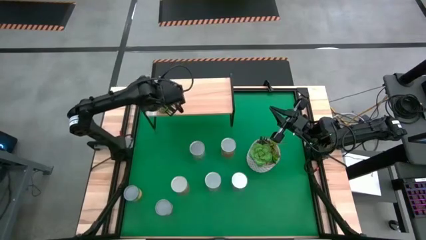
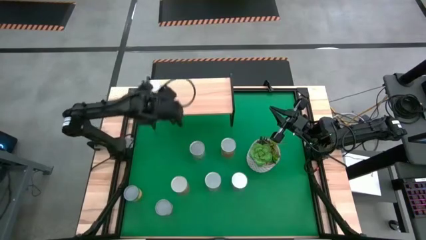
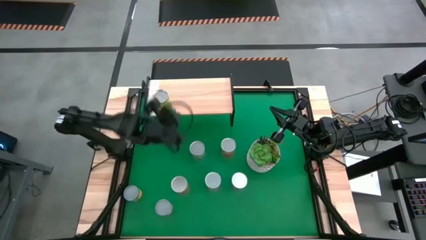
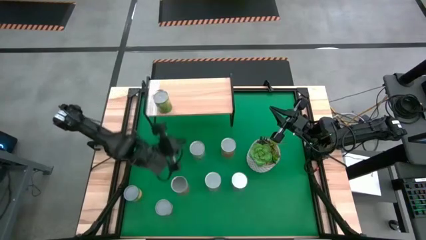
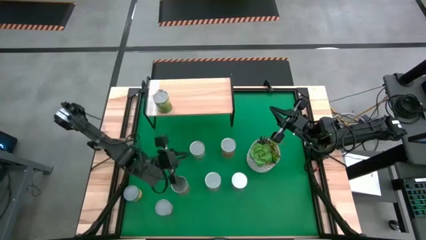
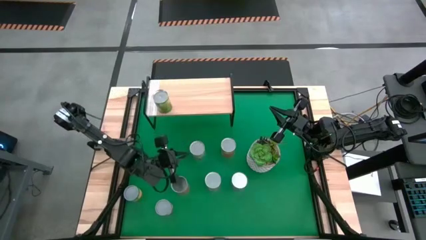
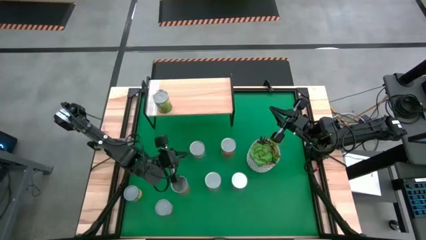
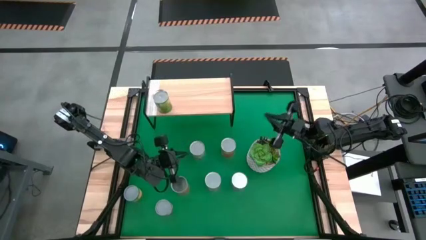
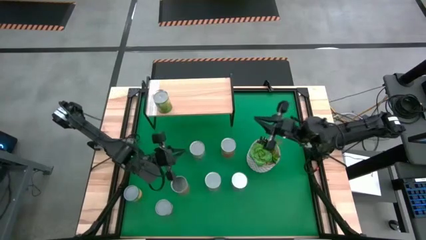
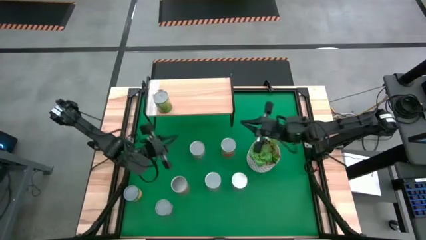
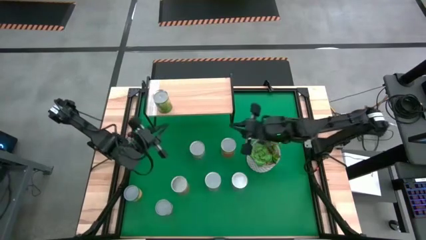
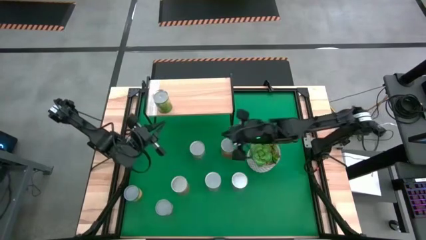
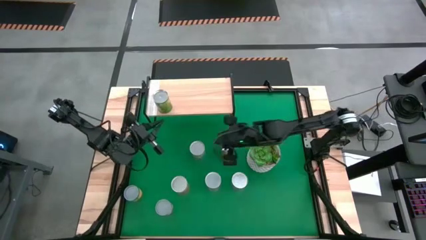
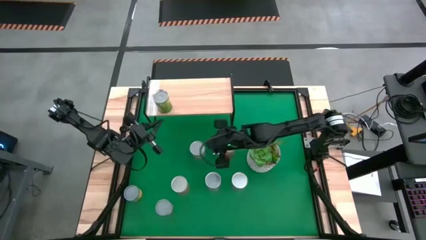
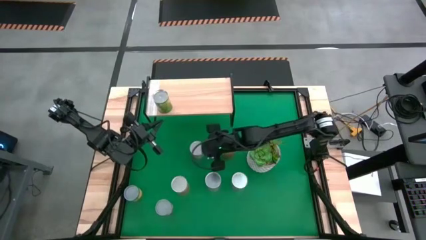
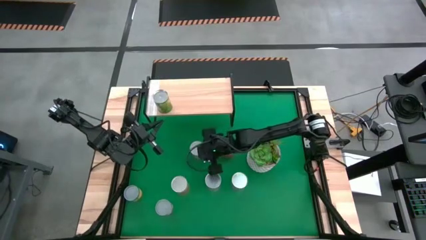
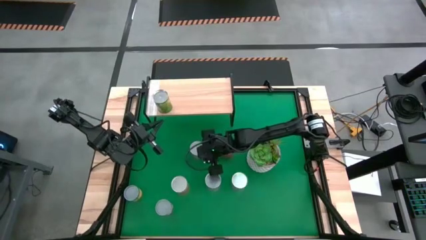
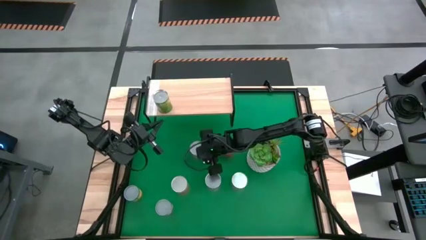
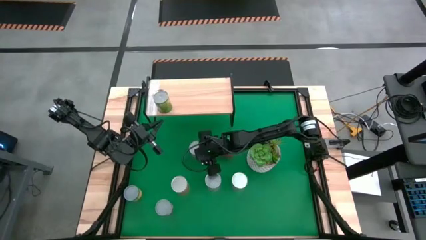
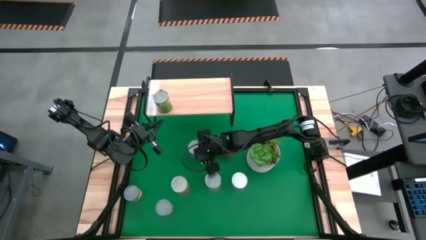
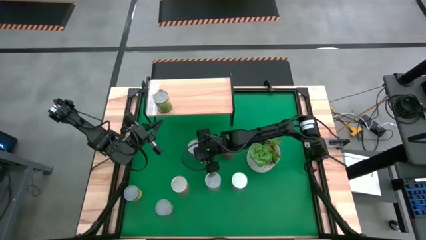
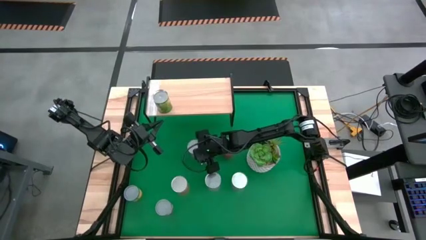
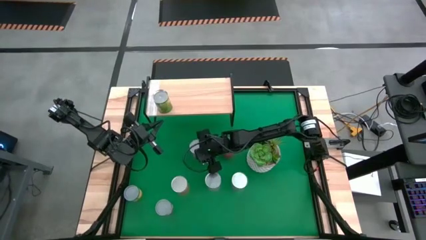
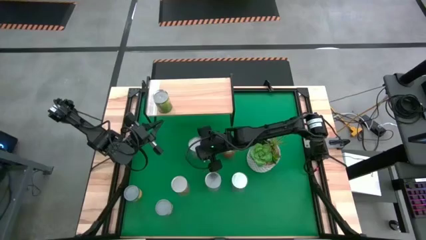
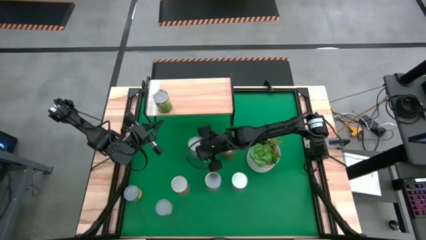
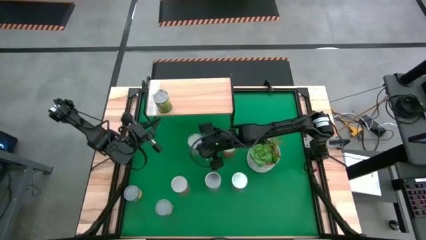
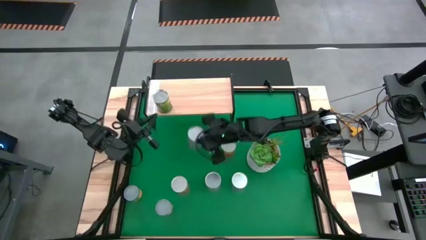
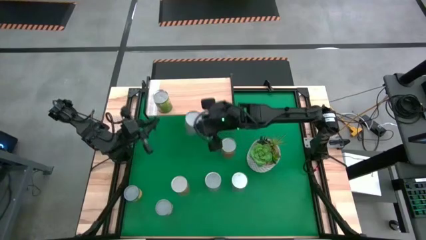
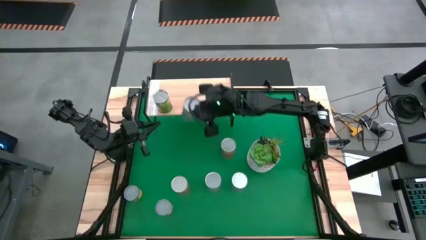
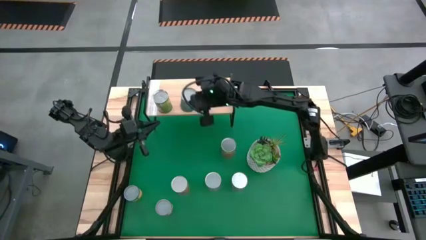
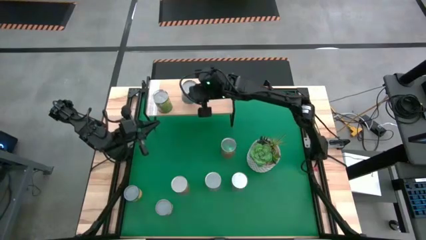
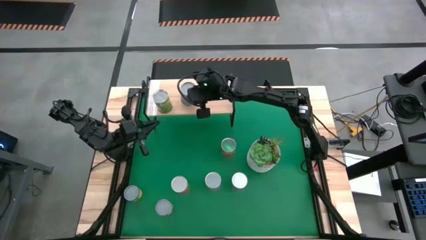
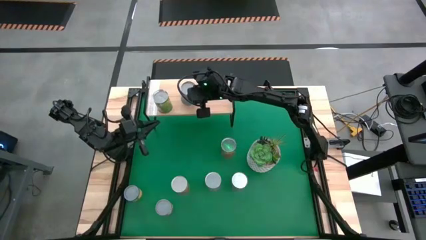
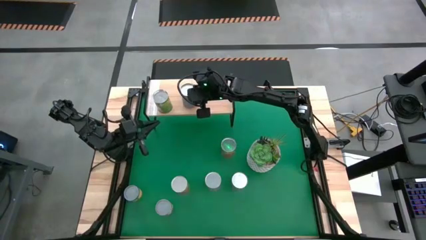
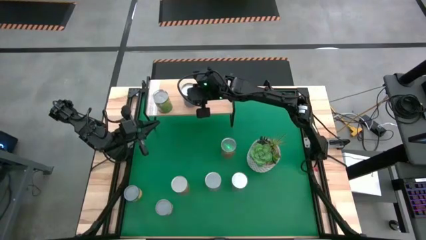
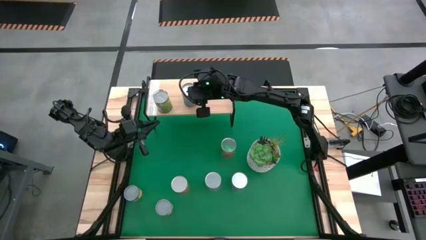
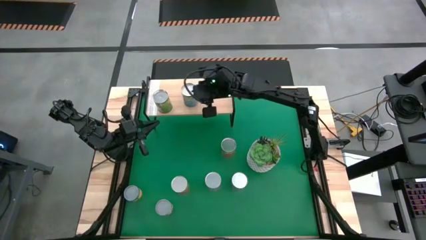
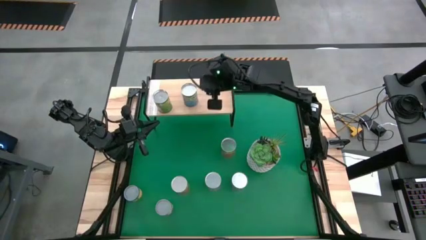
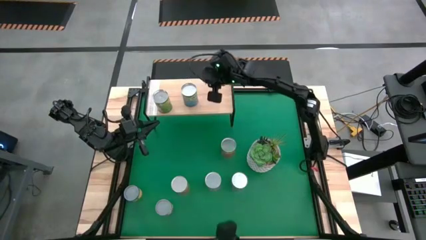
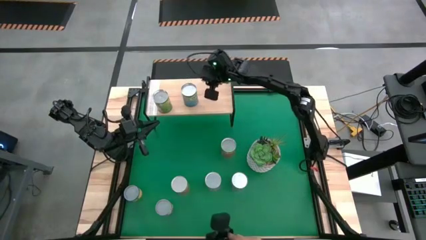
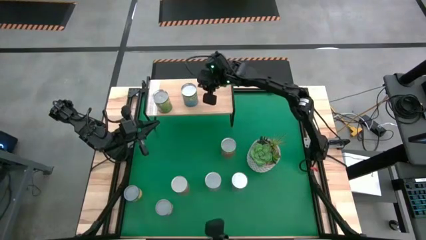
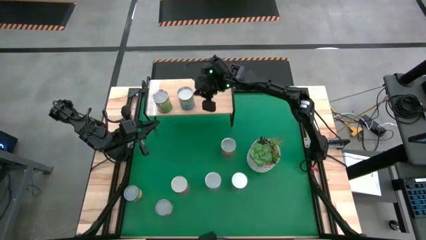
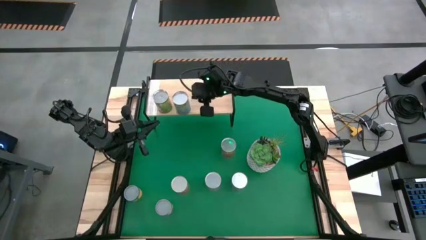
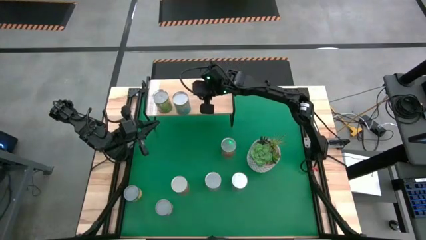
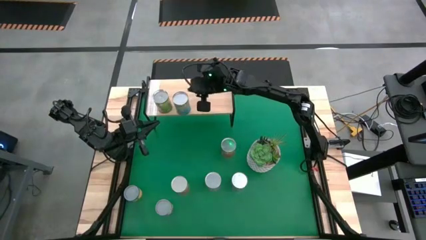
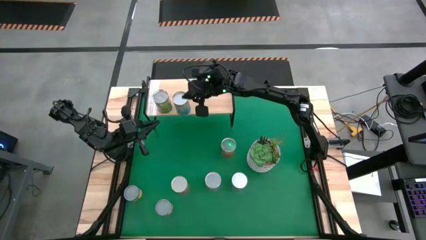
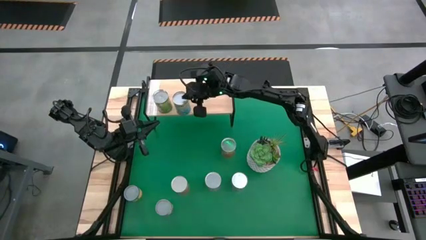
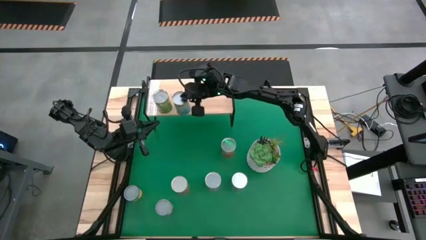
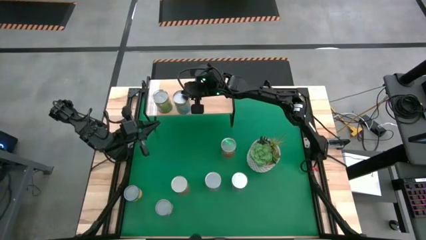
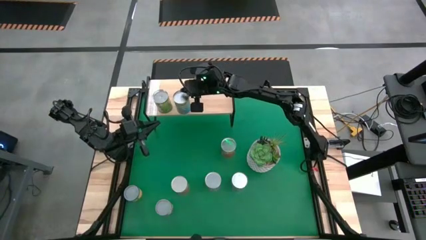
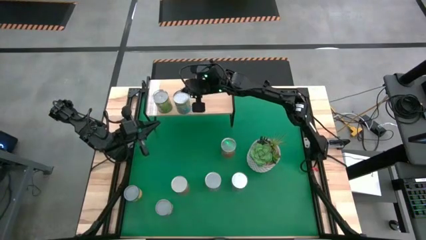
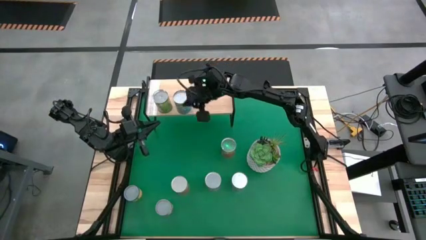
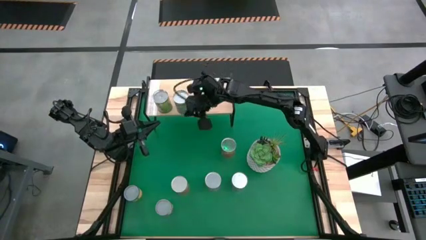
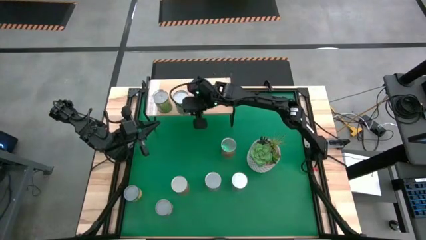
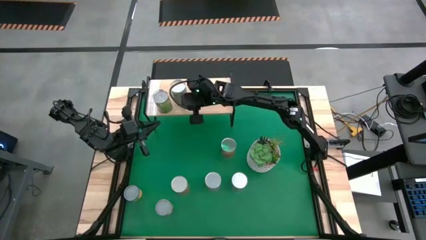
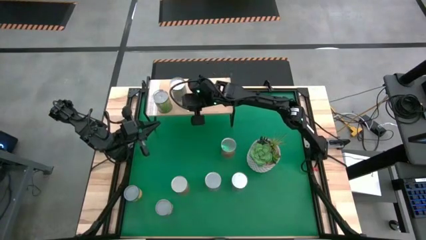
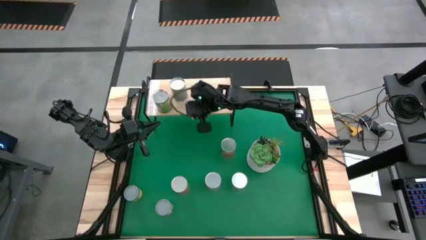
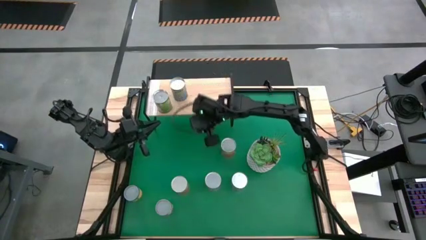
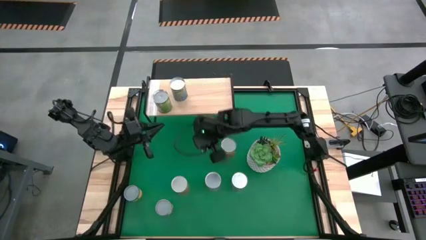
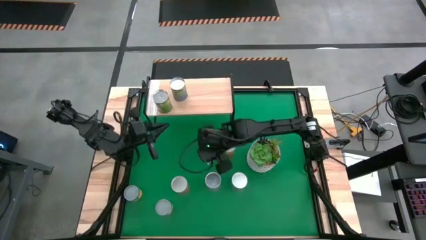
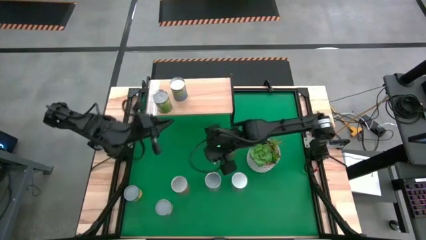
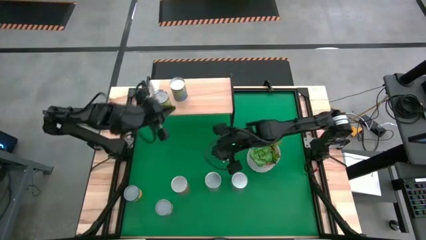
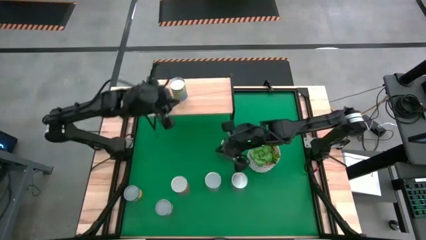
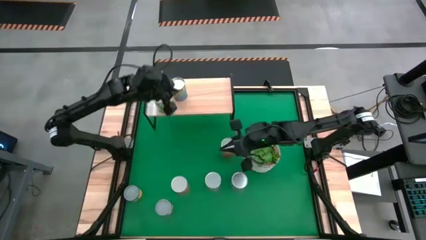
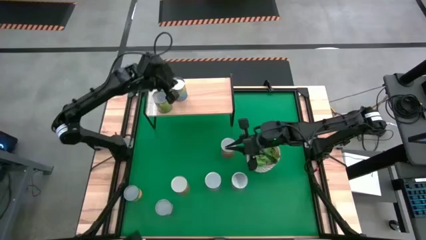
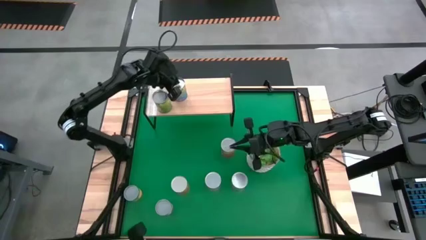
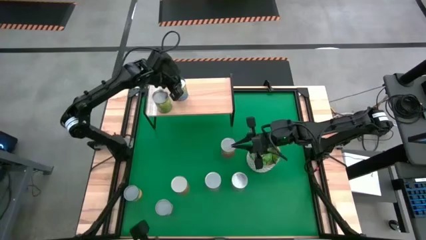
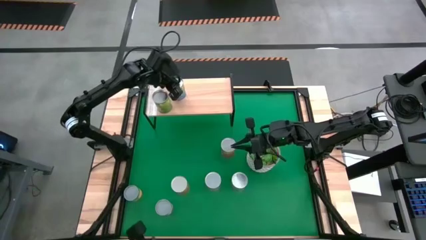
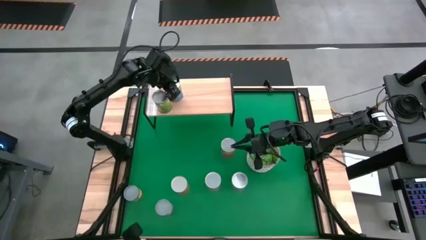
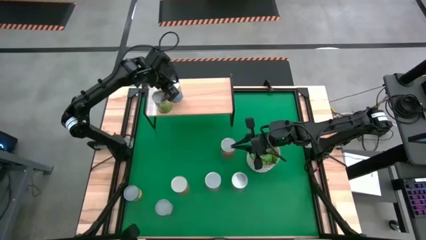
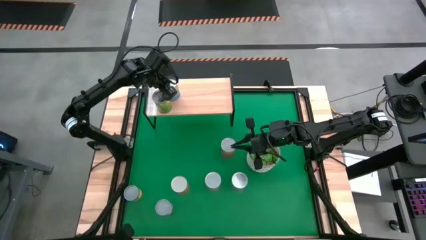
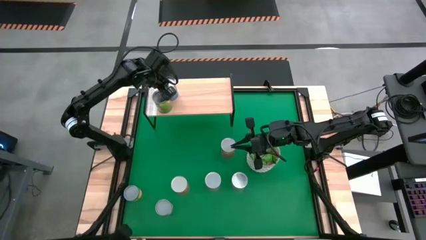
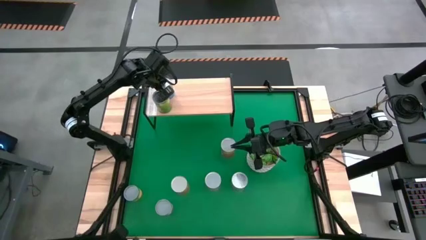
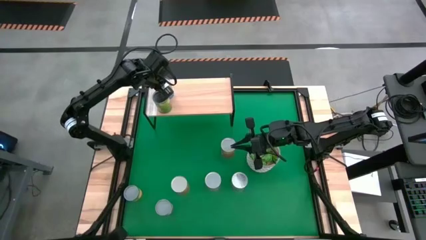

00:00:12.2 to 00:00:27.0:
Task: Pick and place cans onto a shelf
Put the top canned cherries on the shelf
